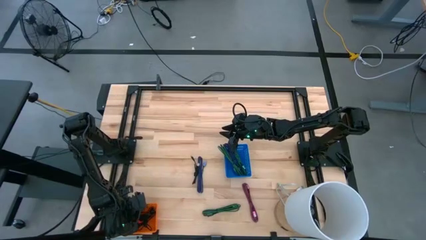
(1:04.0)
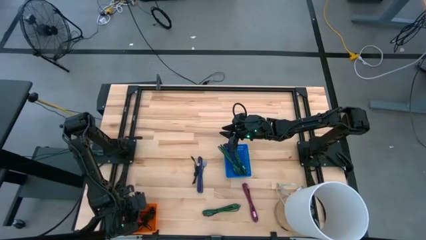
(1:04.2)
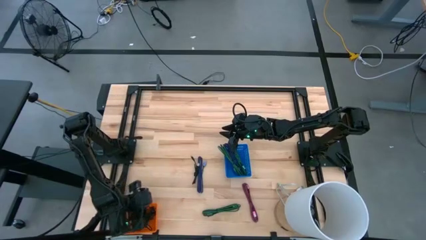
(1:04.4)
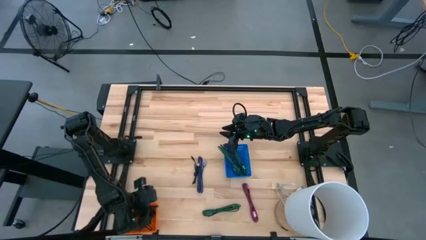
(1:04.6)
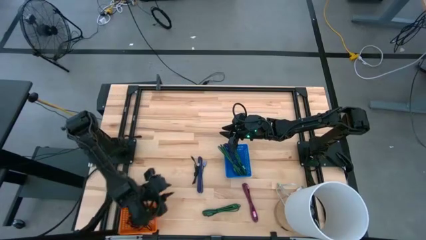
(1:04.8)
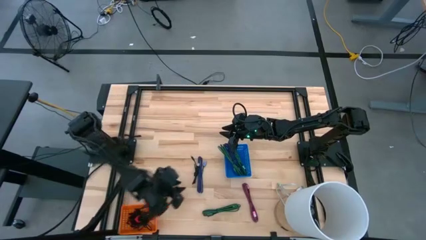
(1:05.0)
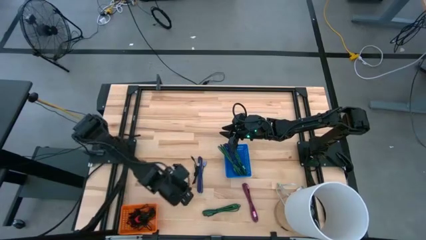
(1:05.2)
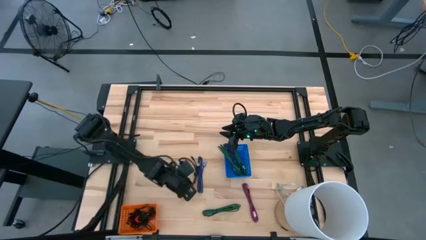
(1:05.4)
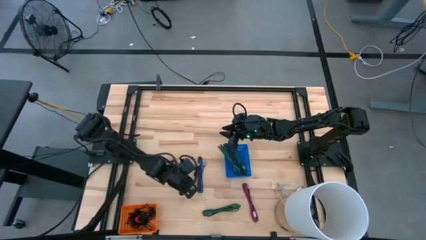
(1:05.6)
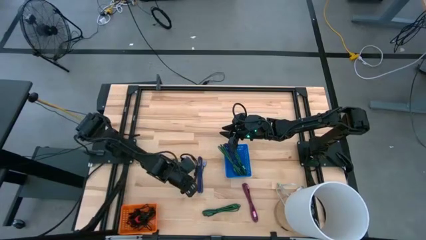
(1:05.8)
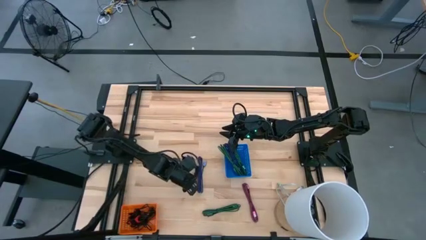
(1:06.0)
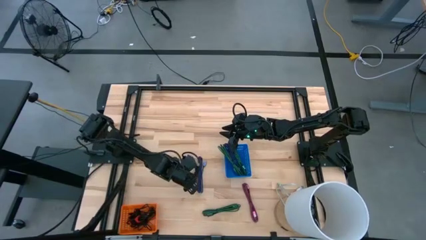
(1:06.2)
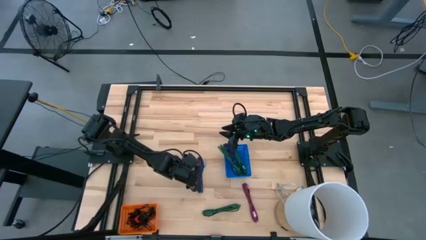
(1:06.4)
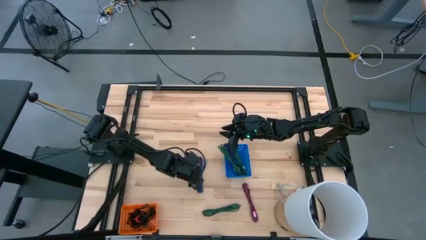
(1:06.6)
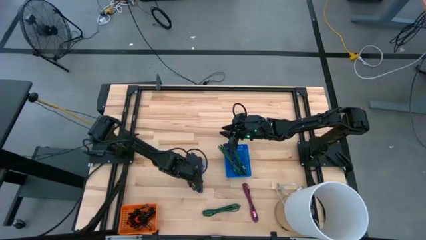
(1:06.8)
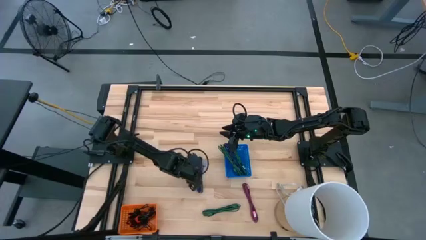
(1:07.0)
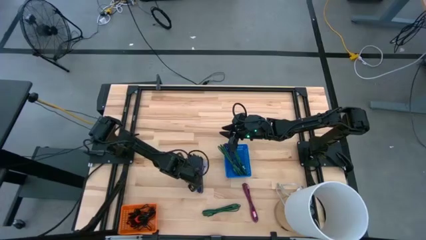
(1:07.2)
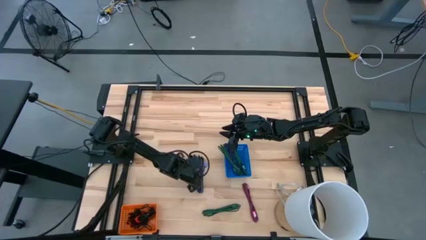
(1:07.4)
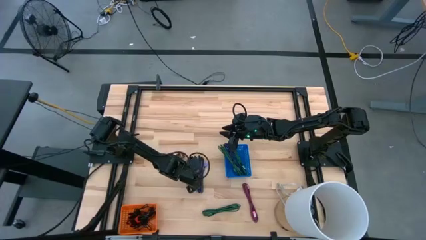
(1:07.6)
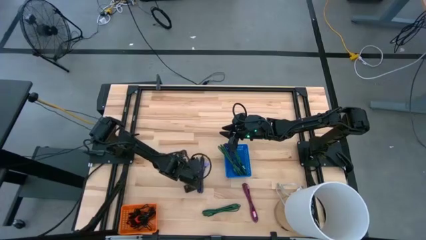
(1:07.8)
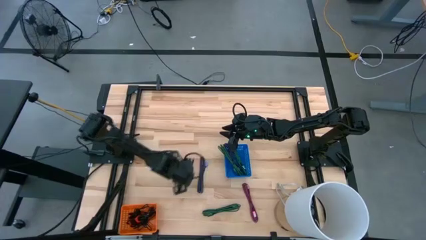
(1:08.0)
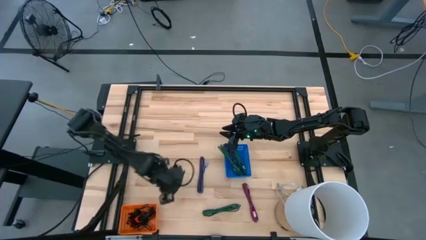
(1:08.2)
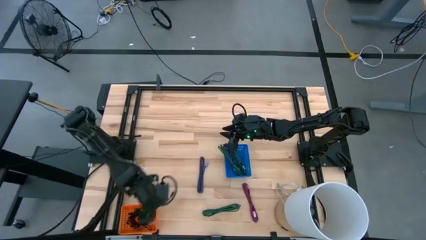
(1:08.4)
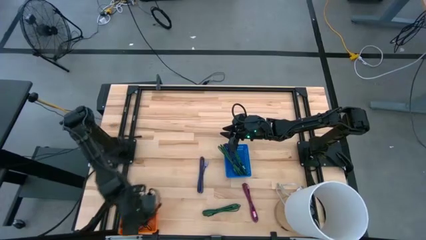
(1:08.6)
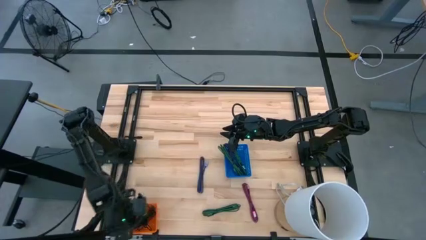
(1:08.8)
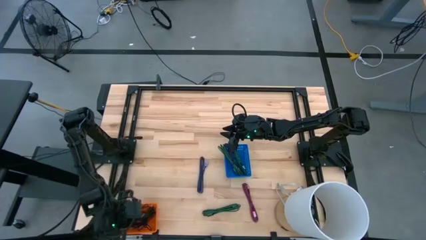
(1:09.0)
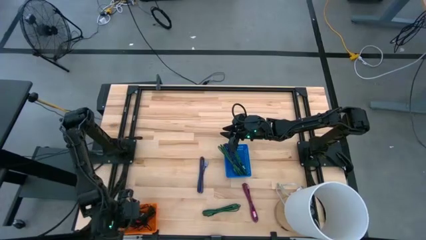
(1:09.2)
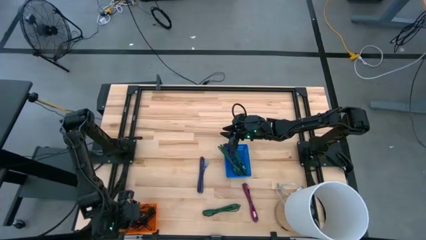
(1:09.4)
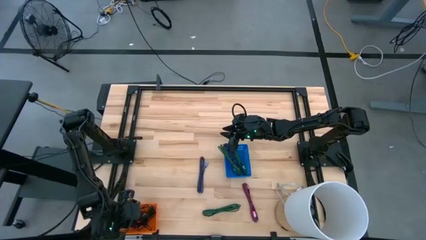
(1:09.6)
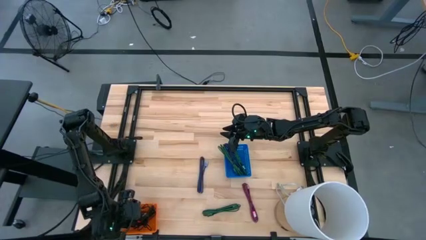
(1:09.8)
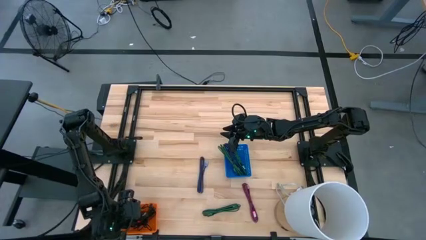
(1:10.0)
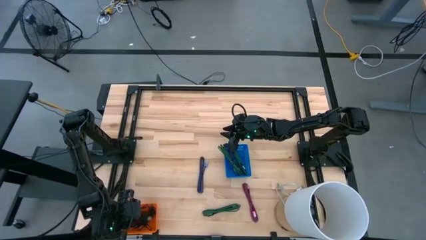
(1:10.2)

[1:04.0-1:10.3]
Task: Pick & Place USB Port
Put the black charger cable into the orange bin

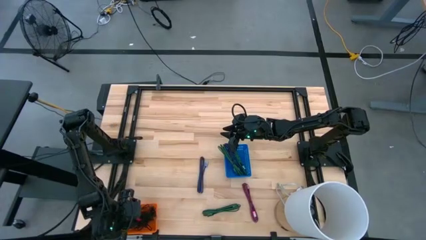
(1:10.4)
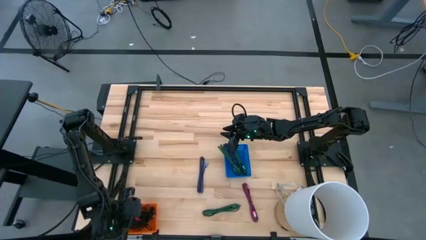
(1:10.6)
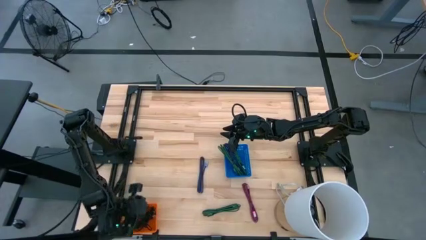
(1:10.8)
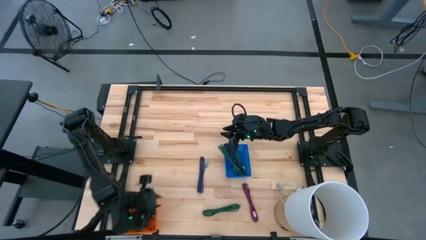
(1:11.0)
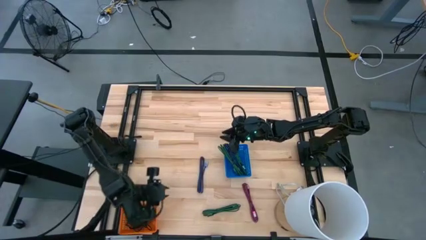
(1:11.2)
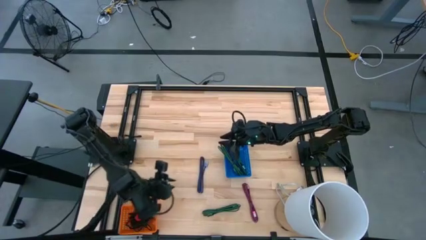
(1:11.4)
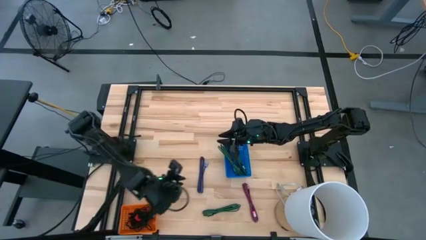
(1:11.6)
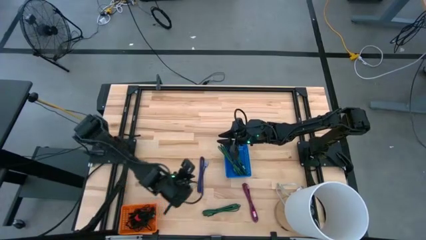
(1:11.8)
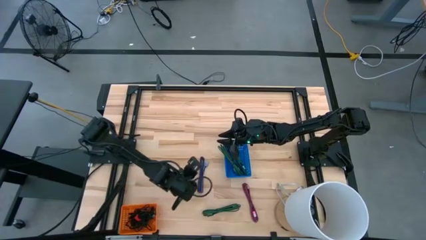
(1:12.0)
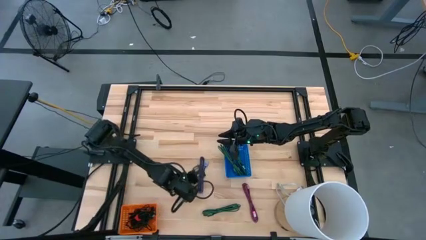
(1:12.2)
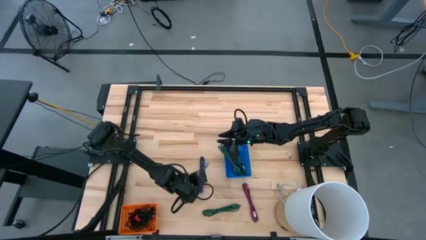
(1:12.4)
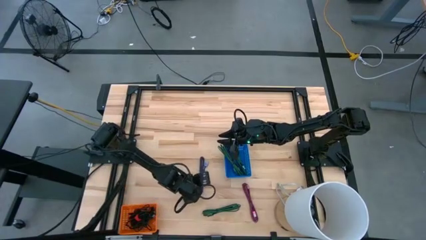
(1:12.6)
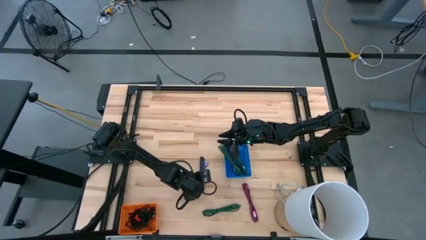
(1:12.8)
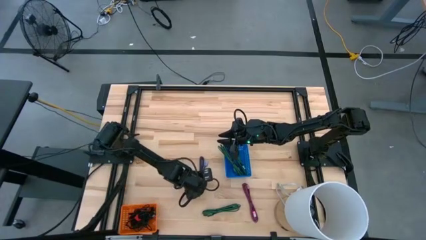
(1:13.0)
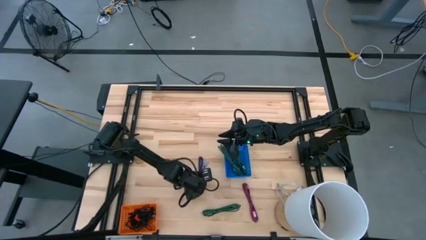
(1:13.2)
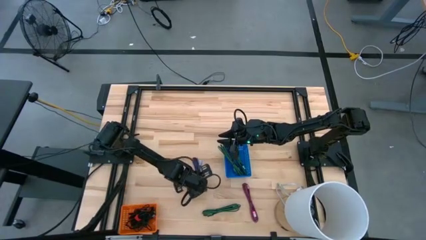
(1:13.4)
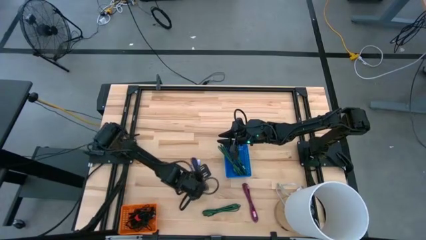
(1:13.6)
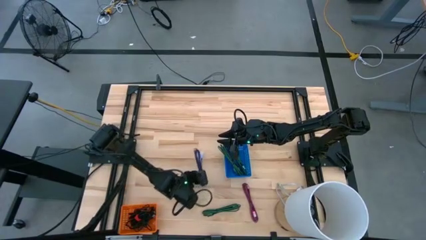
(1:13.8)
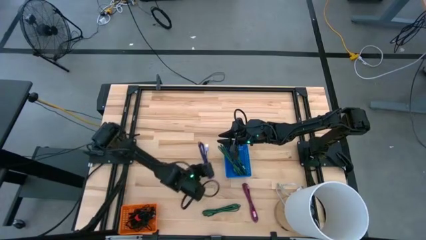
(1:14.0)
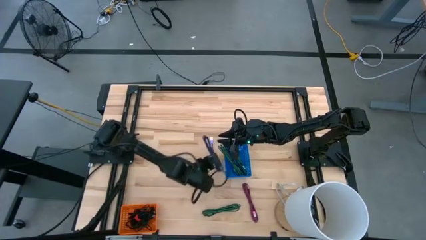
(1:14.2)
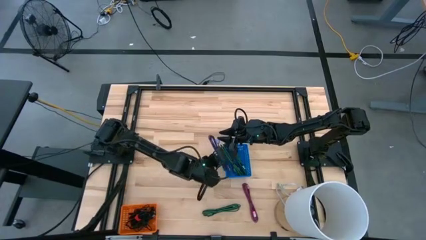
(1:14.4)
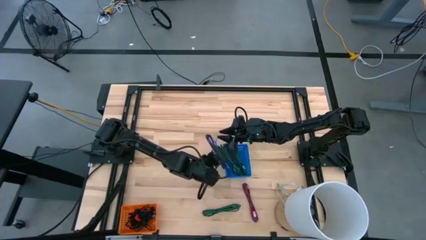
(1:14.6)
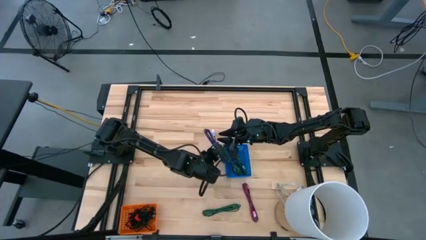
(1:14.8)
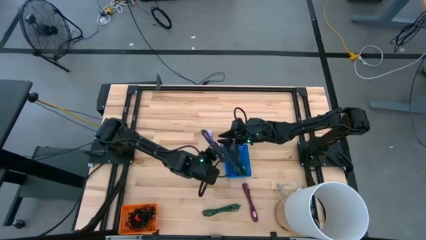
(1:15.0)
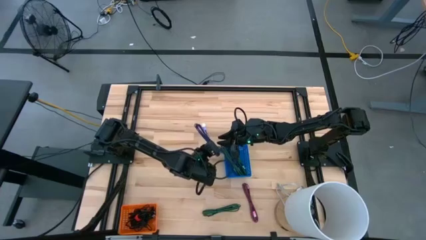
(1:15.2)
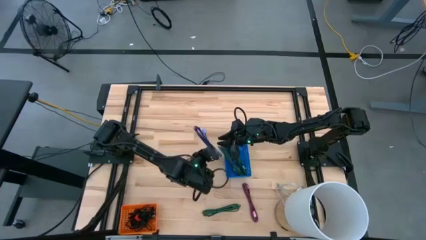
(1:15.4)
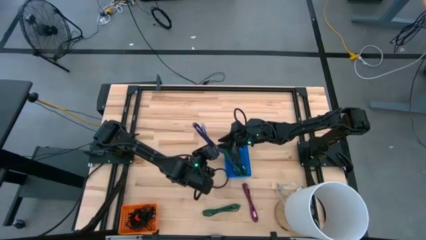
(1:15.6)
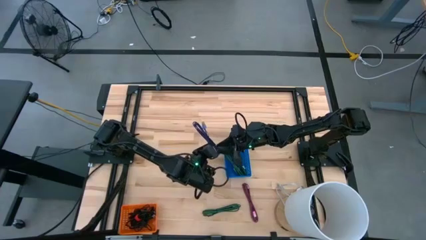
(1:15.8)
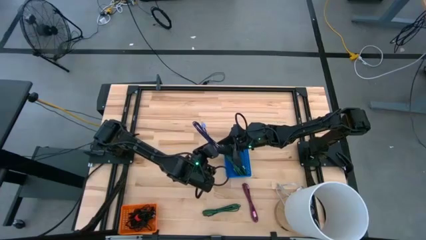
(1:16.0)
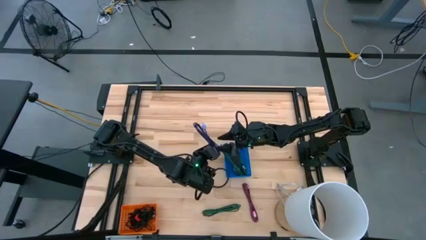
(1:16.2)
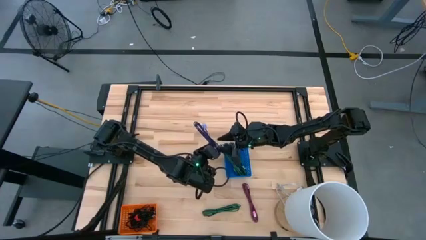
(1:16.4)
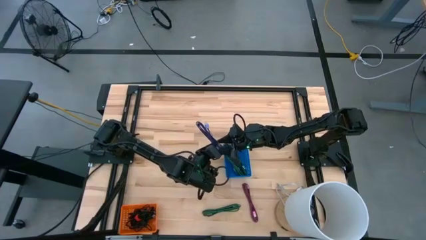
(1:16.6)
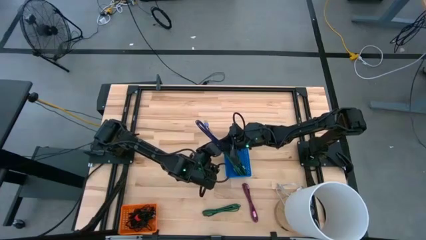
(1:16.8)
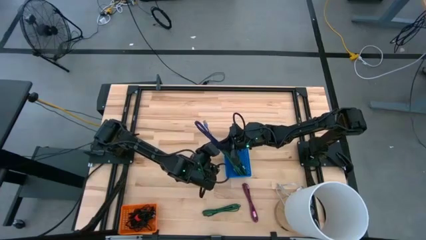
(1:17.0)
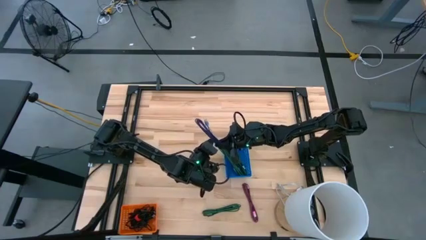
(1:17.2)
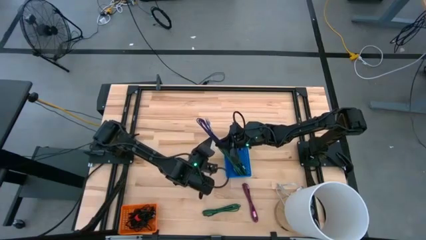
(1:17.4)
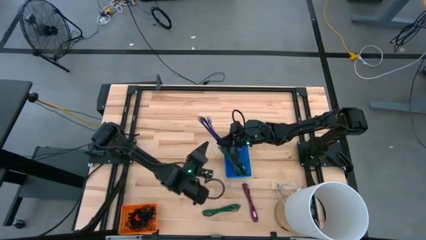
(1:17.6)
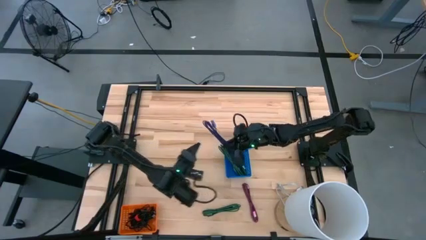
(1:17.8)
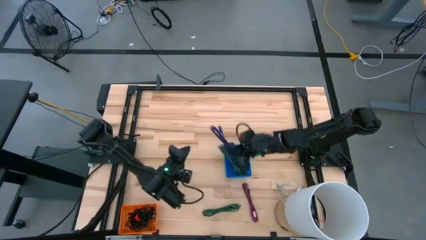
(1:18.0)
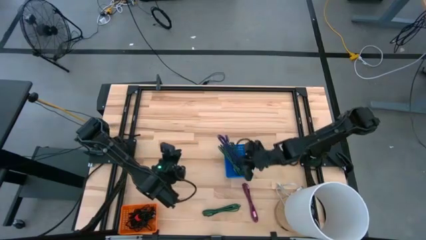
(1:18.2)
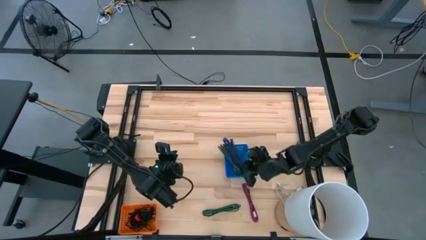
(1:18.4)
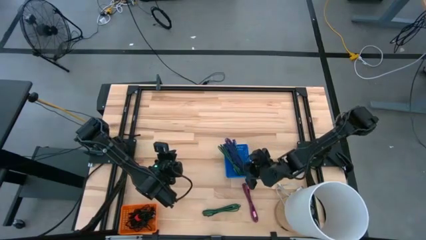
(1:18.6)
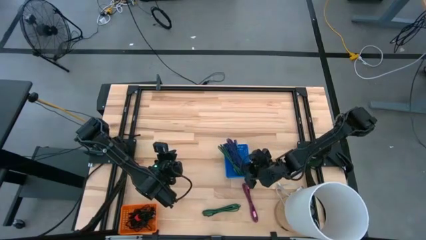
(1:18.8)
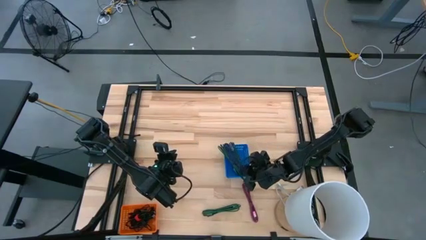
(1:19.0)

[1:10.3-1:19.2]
Put the black and purple charger cable into the blue bin

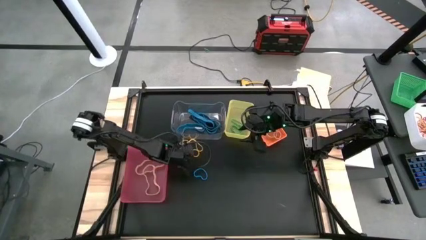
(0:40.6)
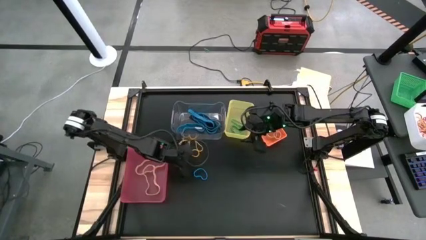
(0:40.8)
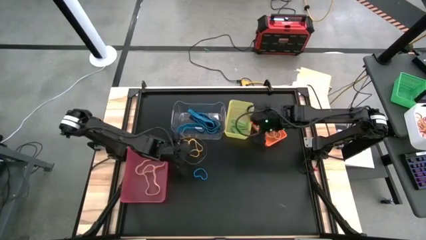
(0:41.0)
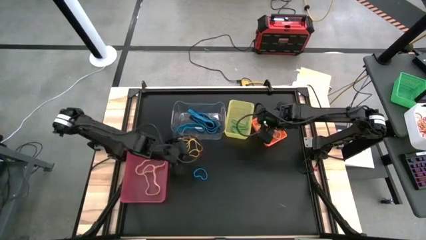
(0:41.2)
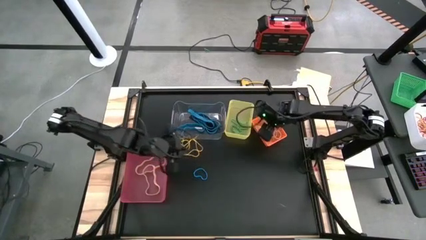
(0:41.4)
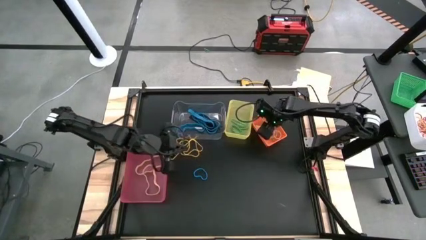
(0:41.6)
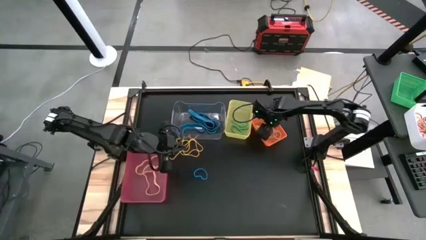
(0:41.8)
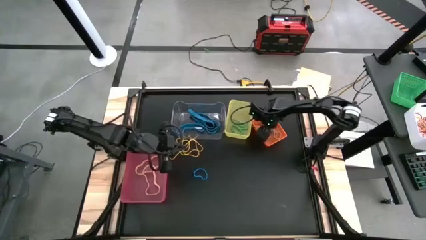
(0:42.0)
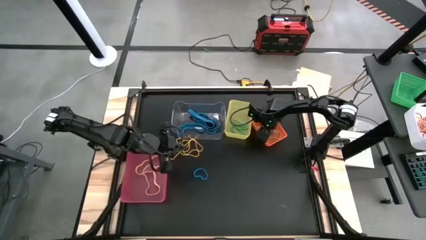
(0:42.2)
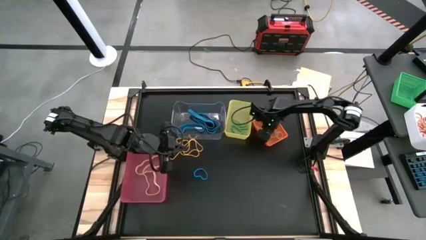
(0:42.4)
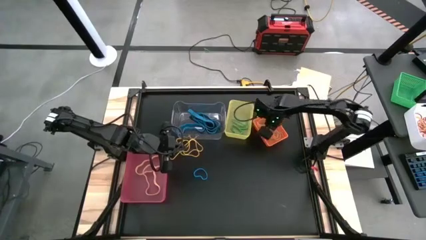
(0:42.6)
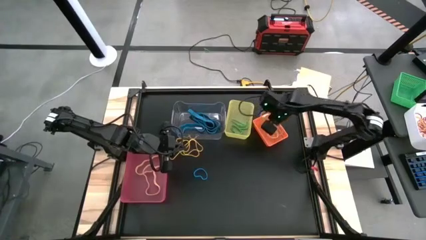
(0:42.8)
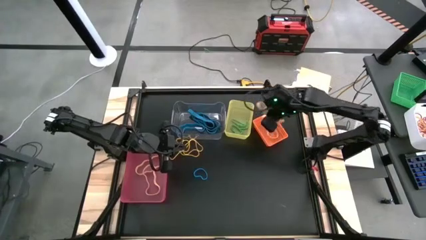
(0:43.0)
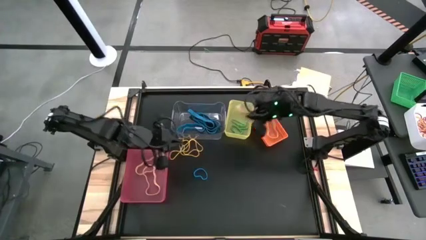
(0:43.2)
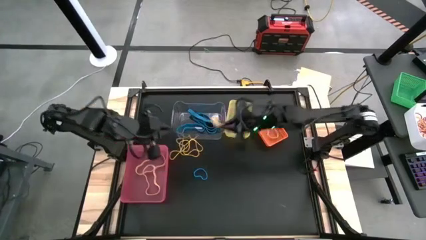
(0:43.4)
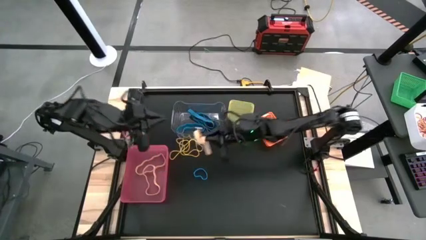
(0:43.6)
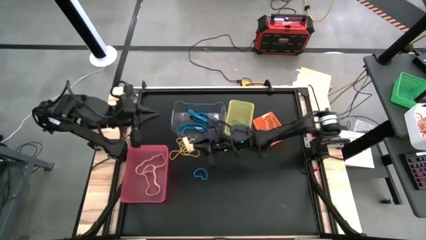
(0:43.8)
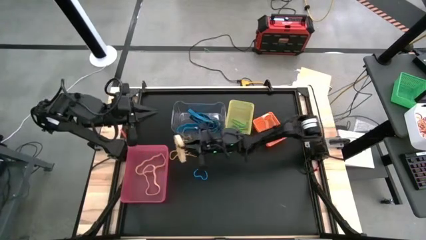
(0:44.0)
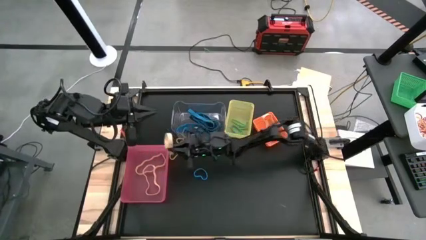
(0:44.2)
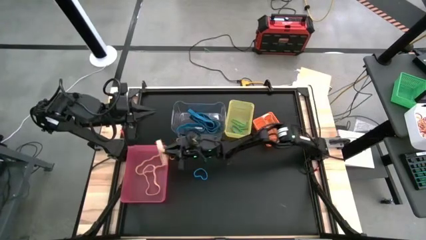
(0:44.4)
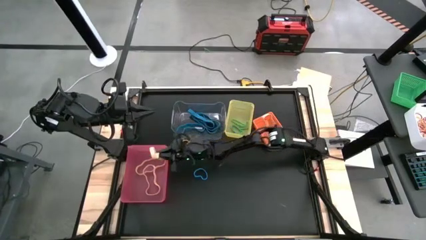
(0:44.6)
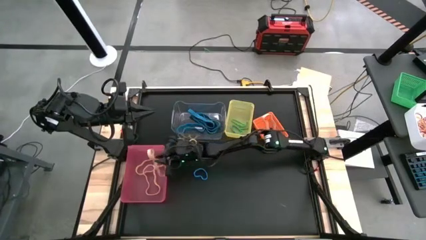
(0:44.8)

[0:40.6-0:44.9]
Task: Sort rubber bands into baskets
Put the orange rubber band from the orange bin to the pink bin
